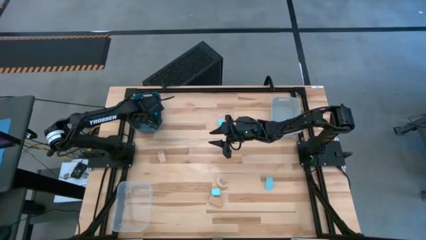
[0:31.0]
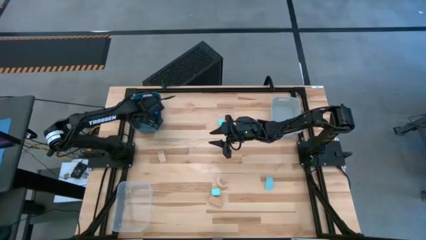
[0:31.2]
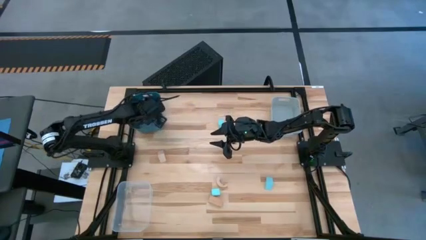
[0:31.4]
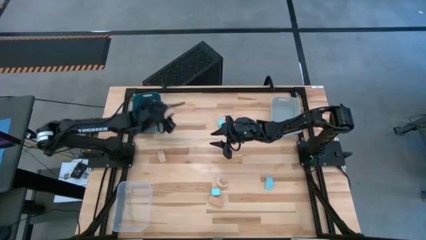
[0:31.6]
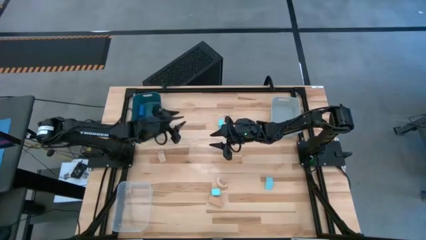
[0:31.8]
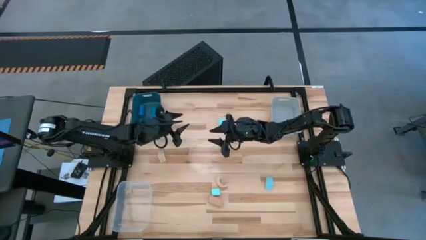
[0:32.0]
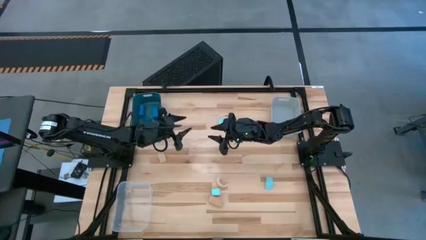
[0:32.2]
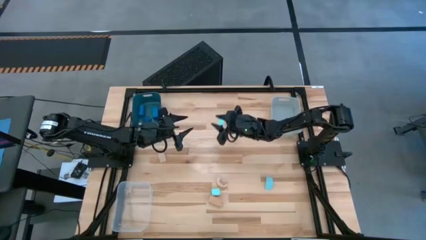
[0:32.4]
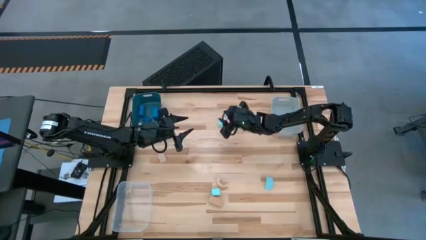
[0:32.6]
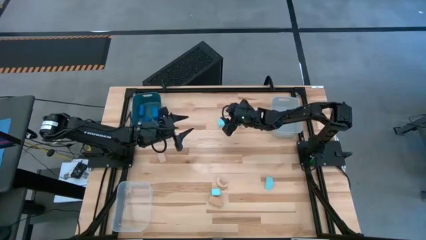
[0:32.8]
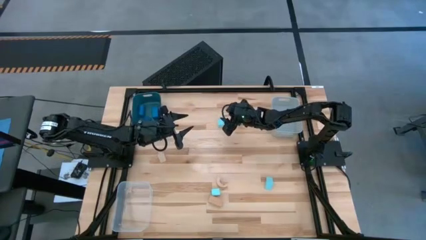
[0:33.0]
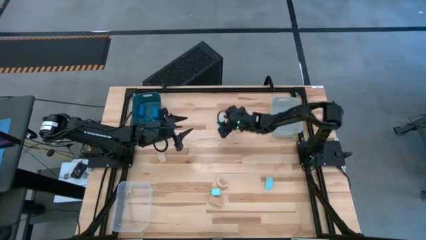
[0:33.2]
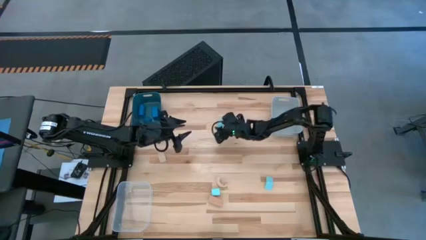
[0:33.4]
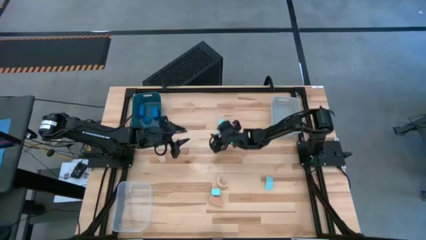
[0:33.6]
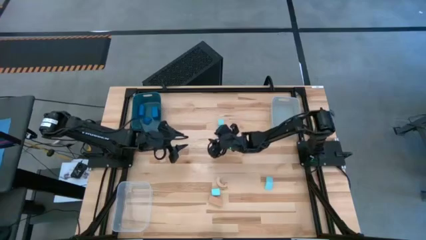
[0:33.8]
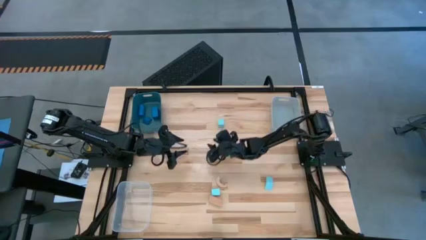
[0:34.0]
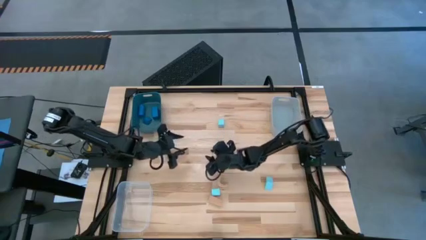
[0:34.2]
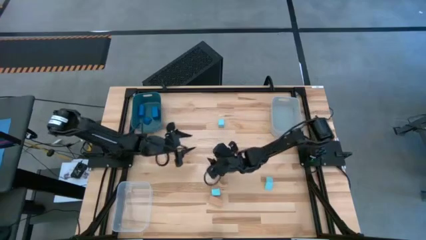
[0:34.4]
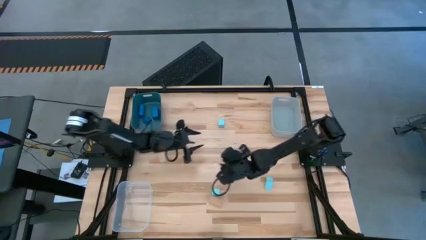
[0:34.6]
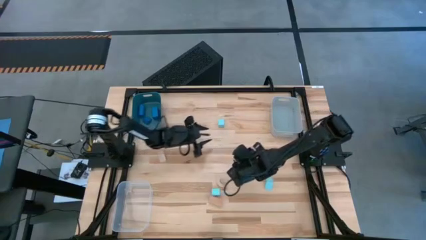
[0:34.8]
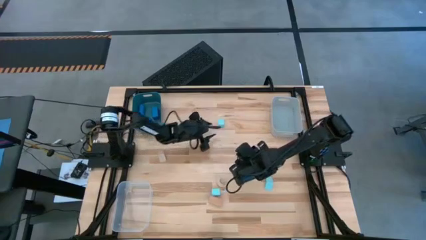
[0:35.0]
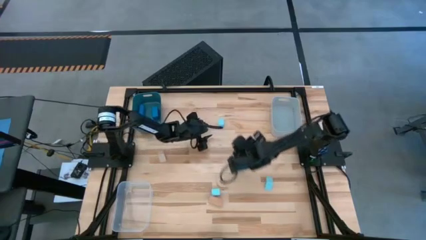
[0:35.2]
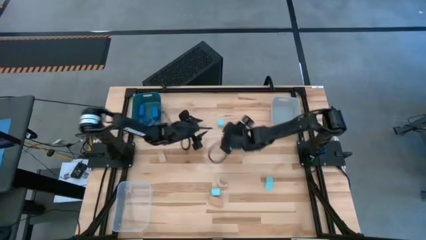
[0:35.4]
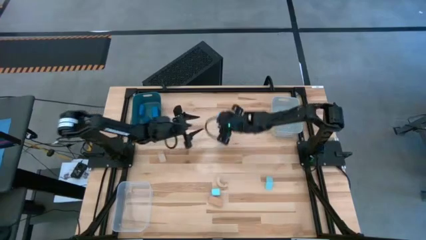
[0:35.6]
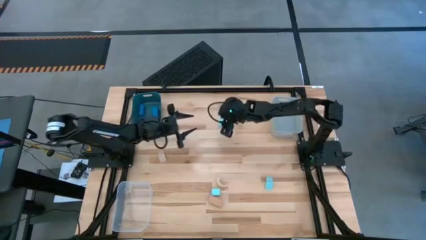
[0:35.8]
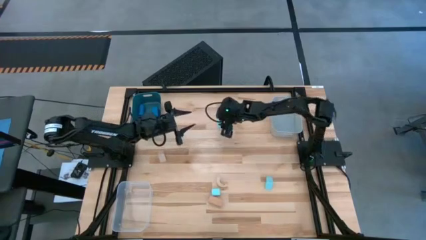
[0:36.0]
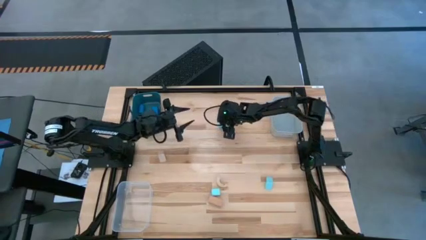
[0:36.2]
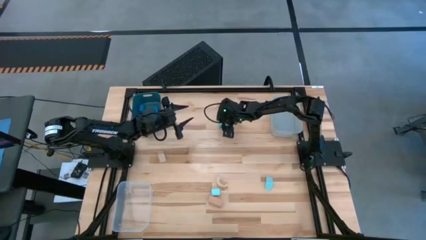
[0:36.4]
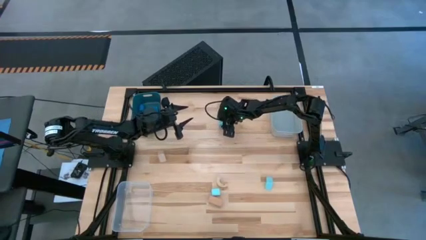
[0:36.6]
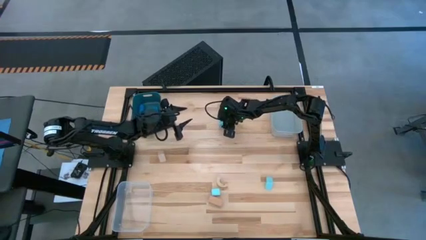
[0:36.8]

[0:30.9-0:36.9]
Task: Sort & place blocks by color
Put the top light blue block into the transparent bin

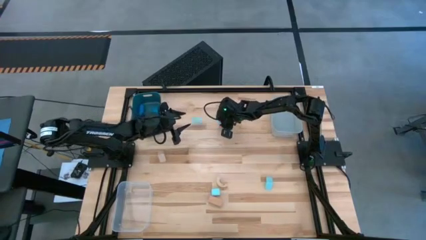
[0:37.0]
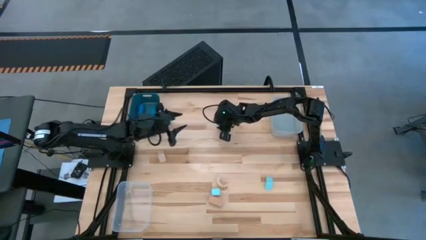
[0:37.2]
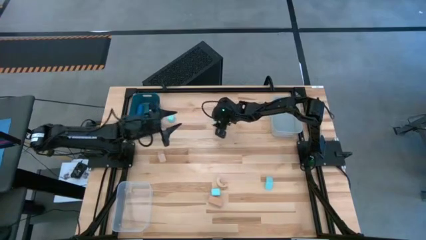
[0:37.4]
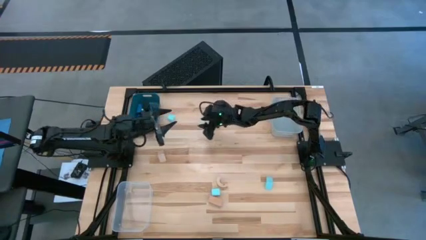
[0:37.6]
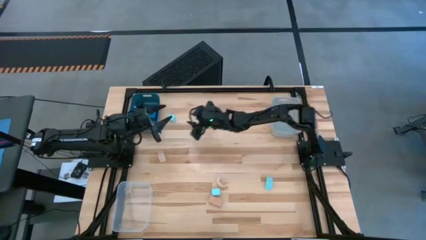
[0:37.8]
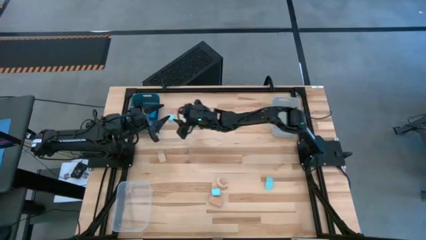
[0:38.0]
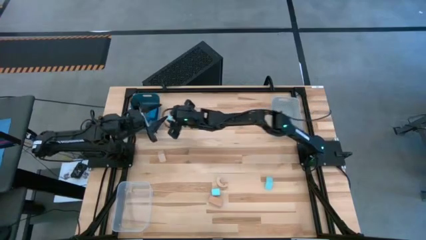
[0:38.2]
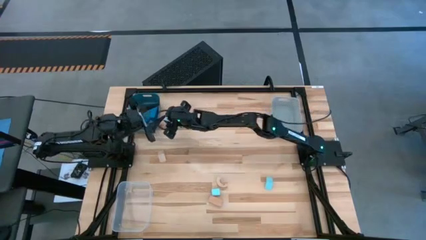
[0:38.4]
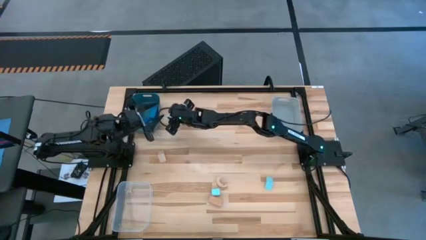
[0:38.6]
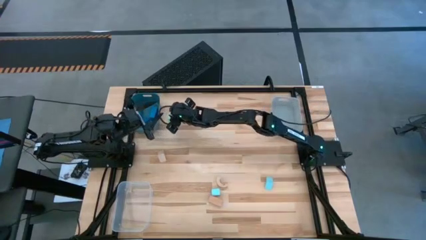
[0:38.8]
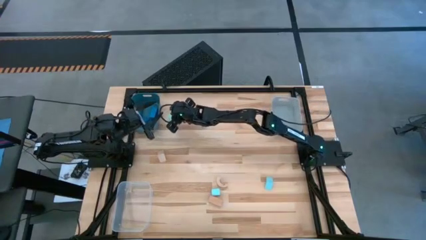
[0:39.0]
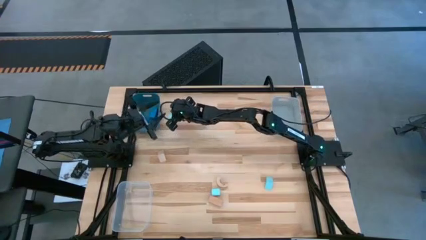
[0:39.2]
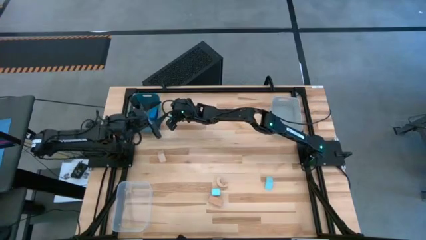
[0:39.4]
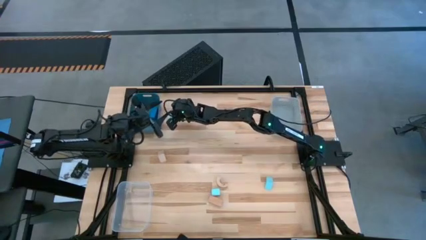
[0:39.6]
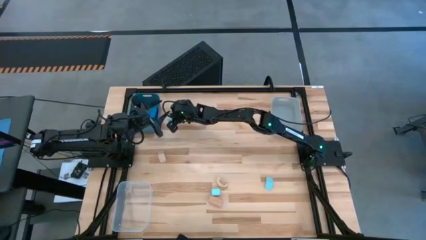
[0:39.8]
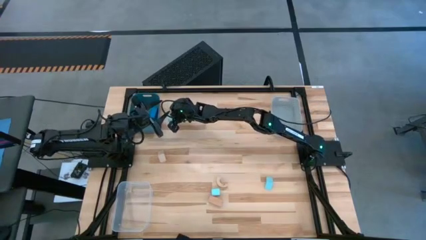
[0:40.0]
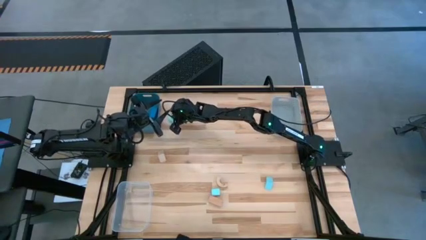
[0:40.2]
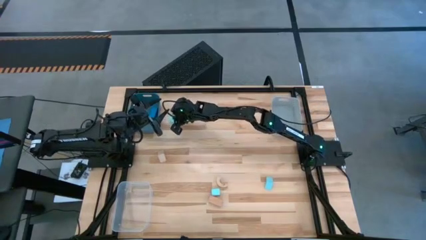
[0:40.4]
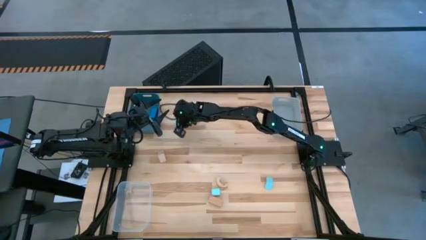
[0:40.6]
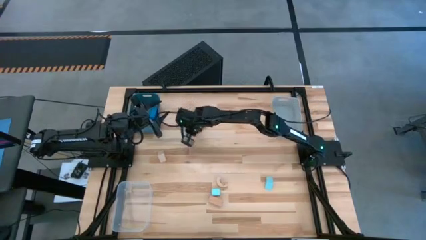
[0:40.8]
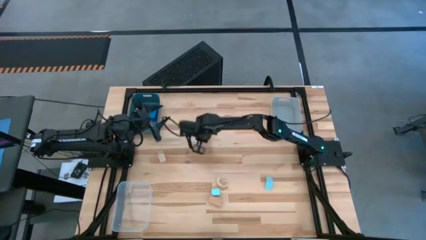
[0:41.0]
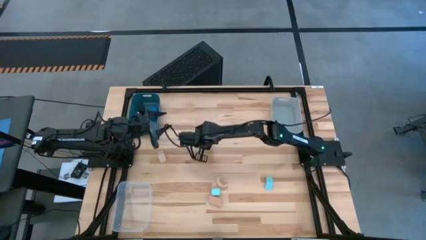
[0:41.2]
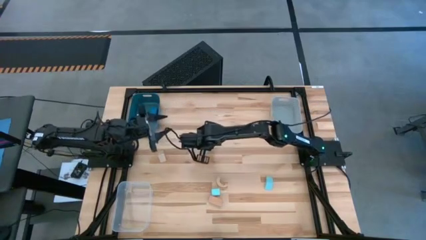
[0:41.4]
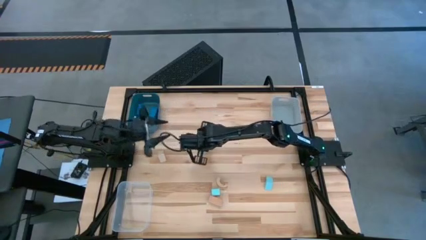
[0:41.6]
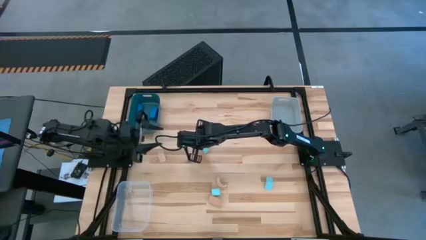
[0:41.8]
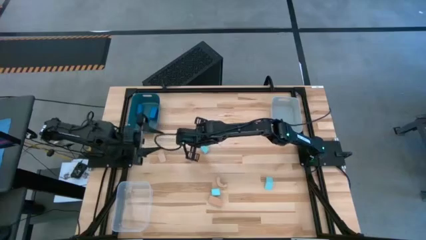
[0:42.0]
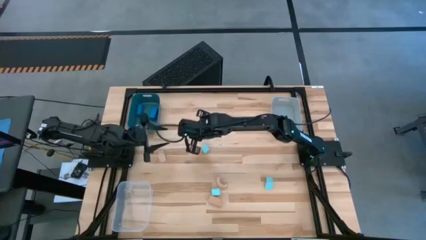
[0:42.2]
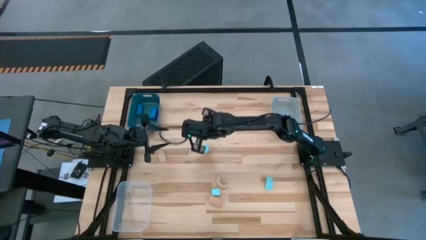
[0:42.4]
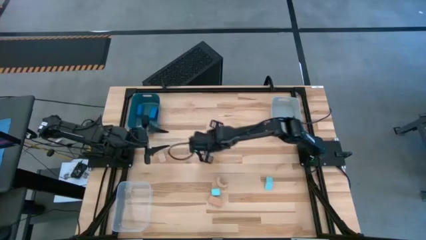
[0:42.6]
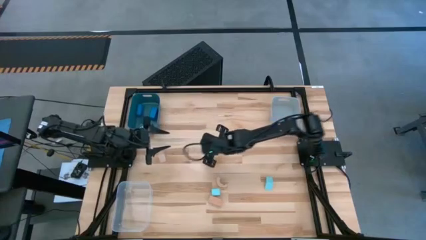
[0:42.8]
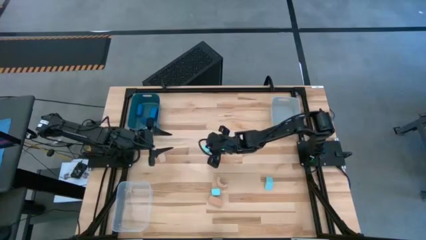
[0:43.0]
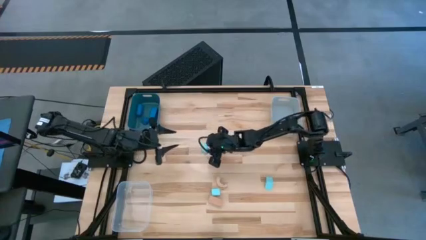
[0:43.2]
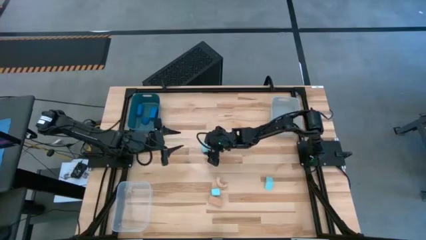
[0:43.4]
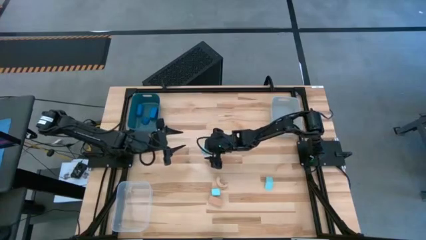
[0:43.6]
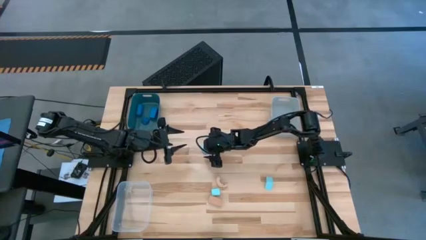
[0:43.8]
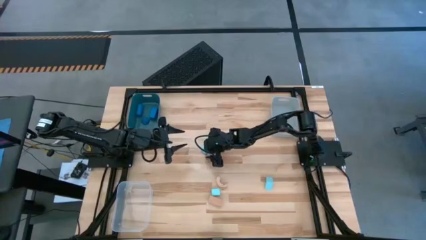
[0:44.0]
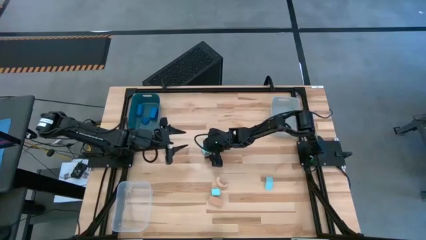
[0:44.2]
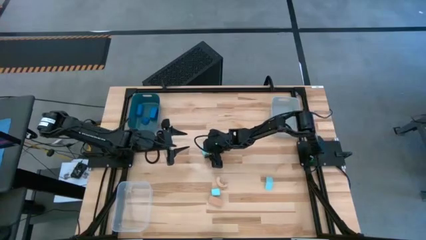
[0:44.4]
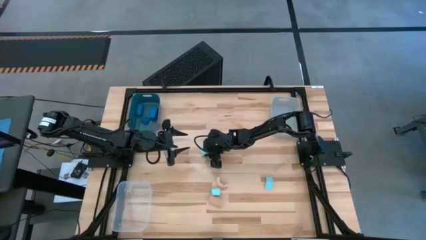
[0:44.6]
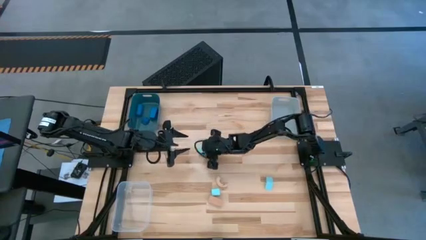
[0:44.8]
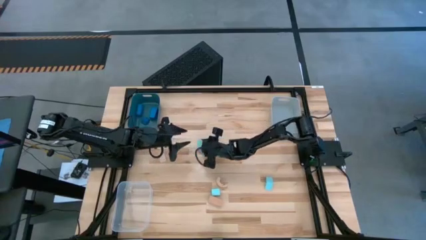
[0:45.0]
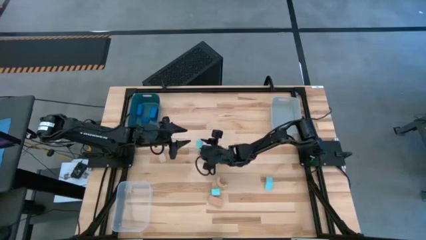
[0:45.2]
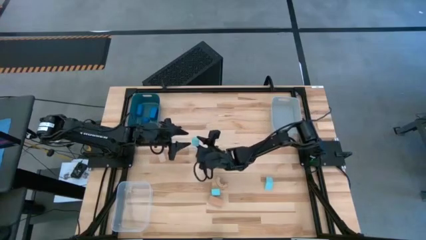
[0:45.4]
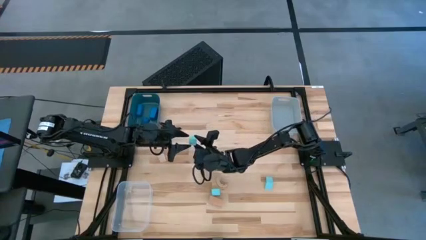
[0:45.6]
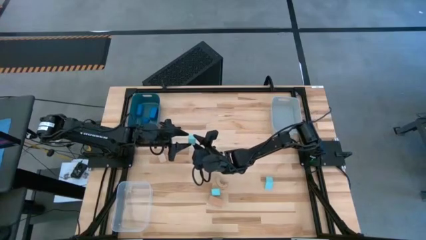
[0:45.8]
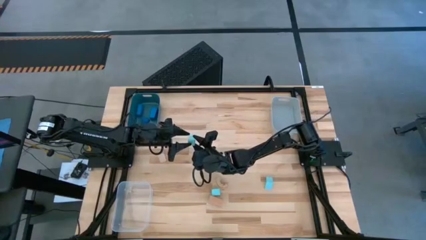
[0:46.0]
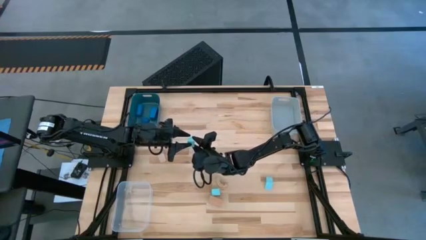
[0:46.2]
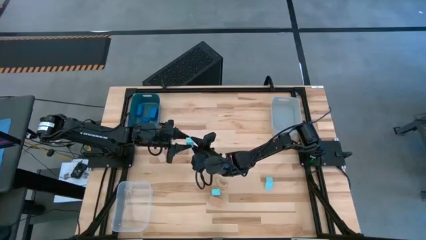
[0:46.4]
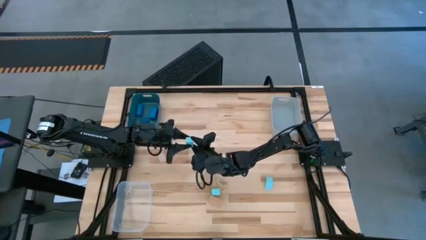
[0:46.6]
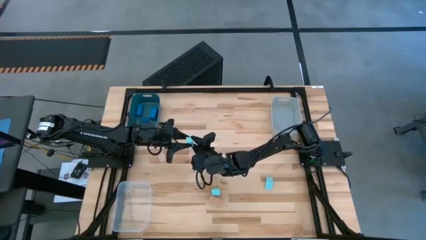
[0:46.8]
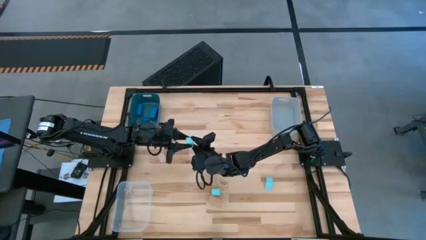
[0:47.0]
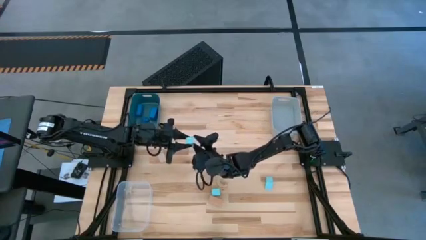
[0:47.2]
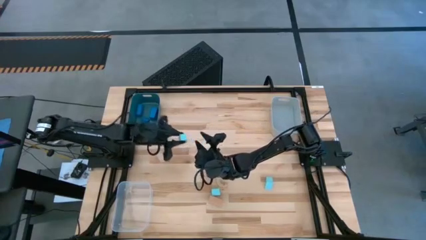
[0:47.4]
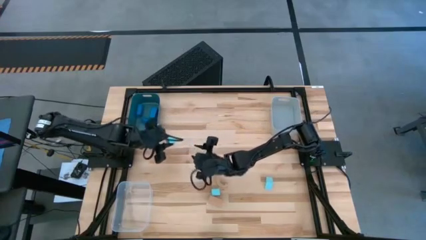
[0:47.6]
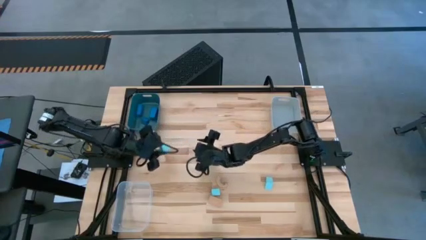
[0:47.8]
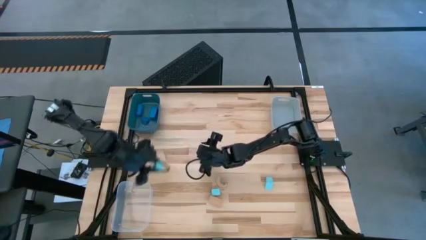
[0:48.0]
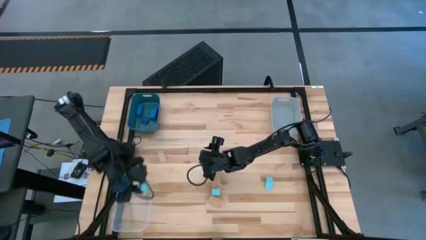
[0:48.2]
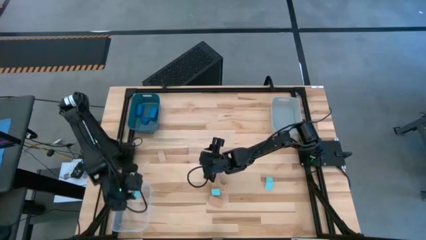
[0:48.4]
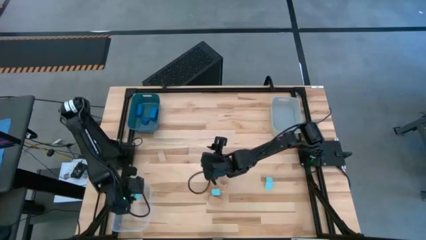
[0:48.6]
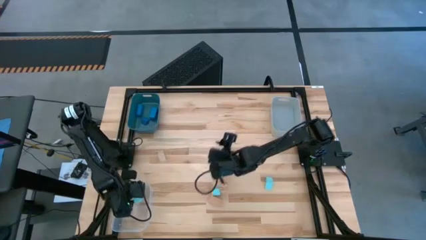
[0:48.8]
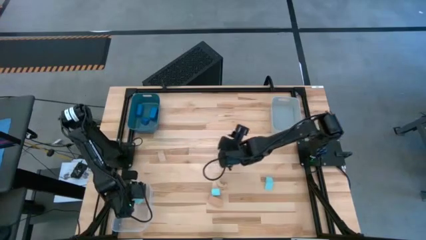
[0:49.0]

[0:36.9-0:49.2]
Put the top light blue block into the transparent bin
